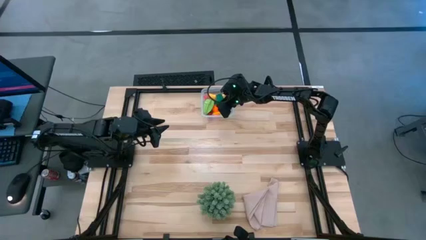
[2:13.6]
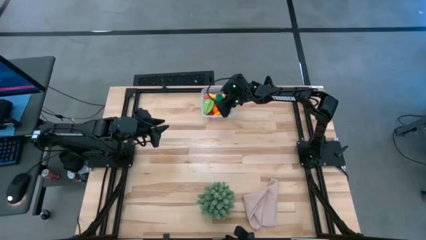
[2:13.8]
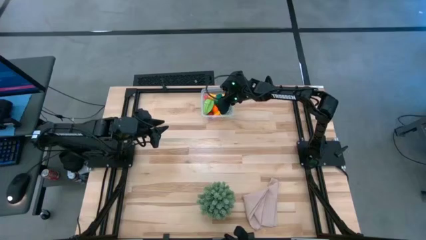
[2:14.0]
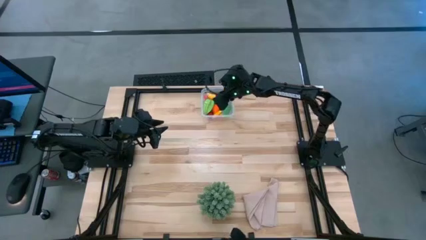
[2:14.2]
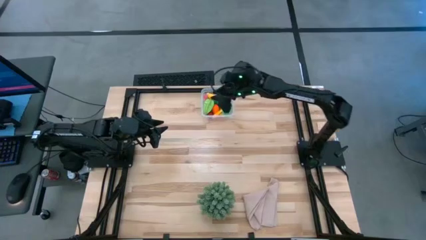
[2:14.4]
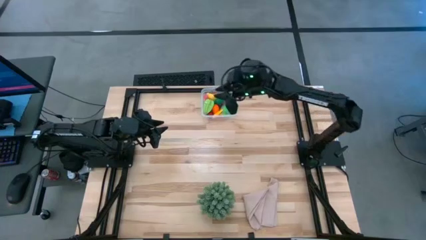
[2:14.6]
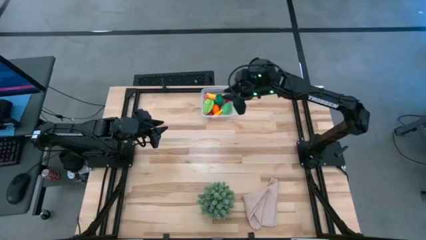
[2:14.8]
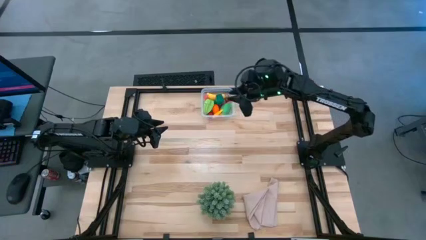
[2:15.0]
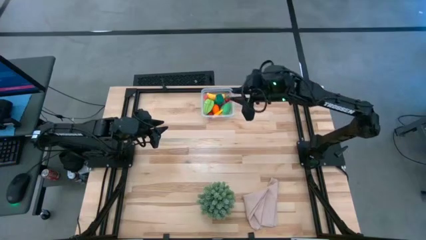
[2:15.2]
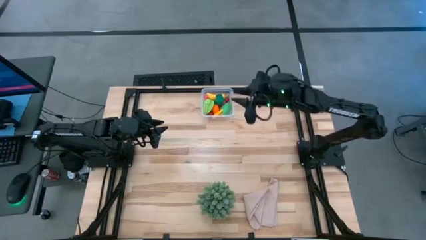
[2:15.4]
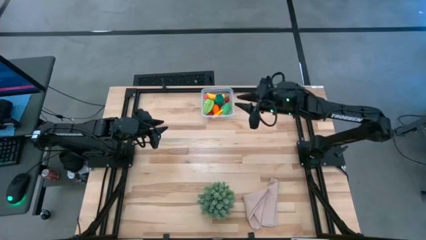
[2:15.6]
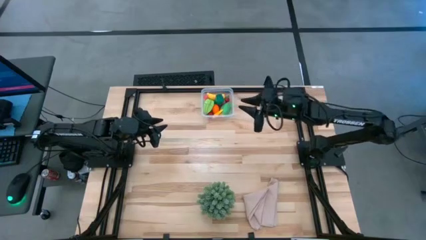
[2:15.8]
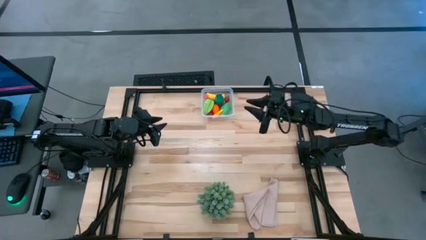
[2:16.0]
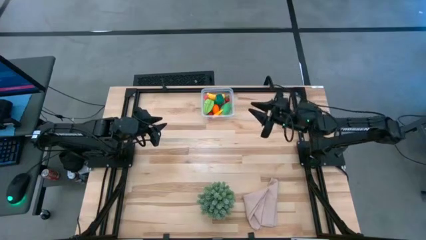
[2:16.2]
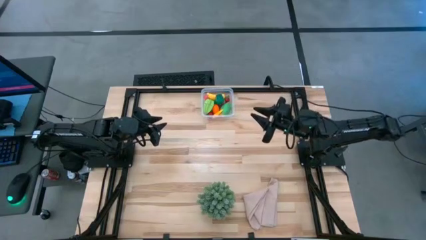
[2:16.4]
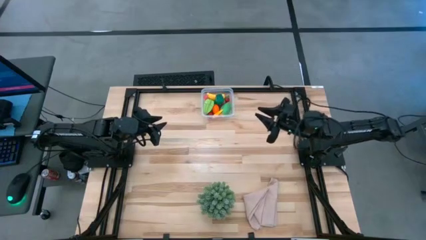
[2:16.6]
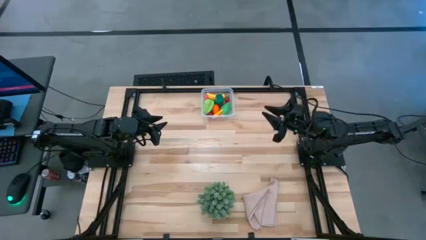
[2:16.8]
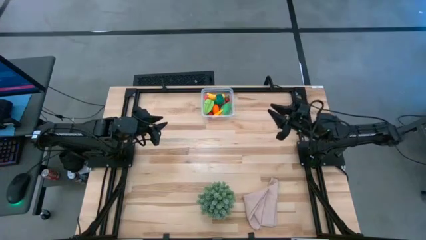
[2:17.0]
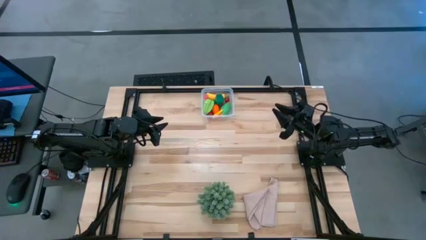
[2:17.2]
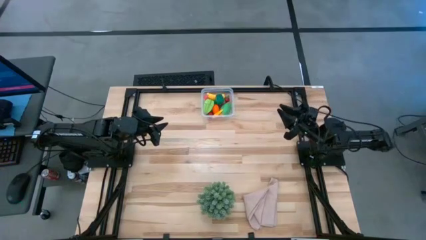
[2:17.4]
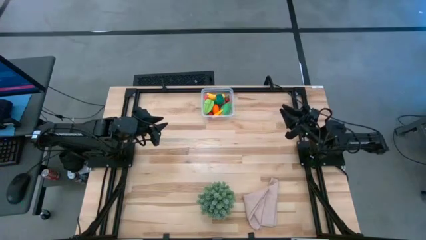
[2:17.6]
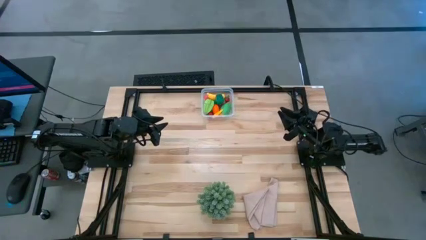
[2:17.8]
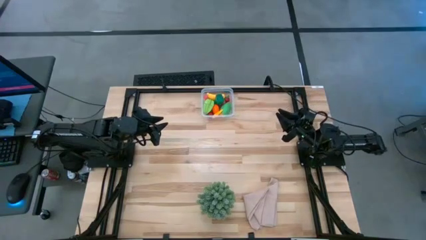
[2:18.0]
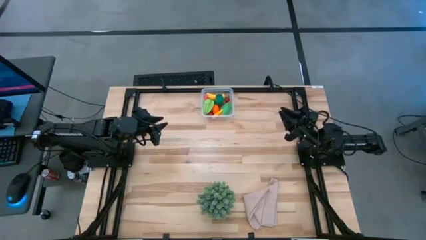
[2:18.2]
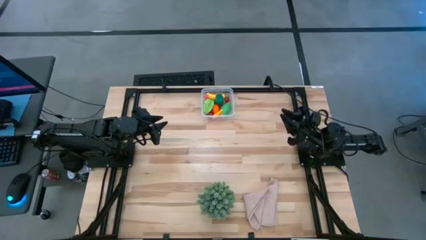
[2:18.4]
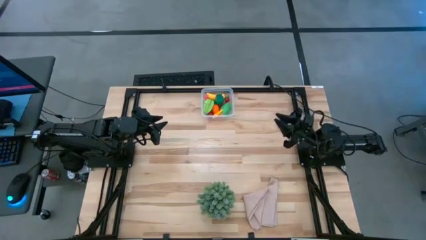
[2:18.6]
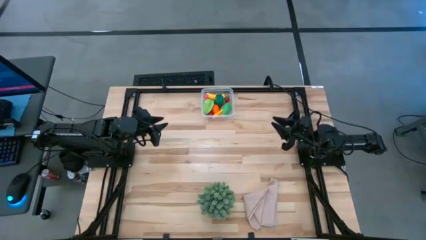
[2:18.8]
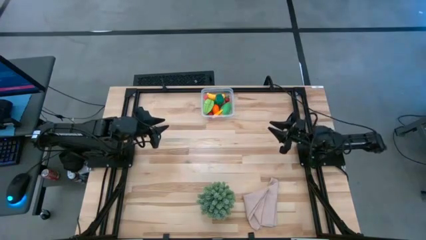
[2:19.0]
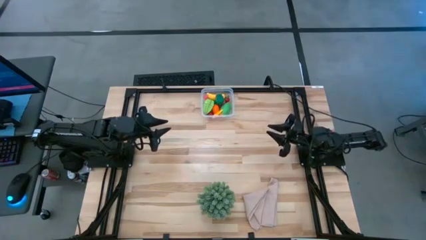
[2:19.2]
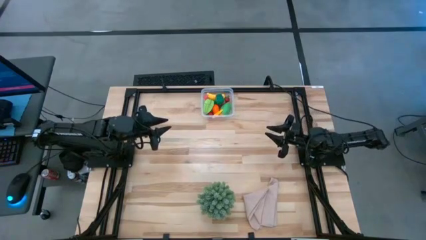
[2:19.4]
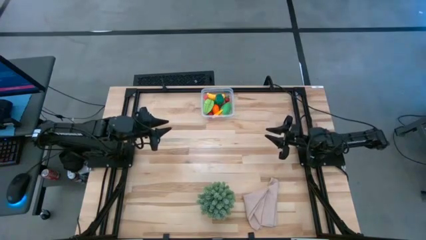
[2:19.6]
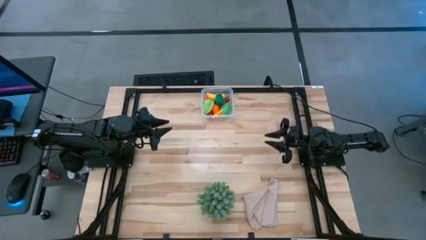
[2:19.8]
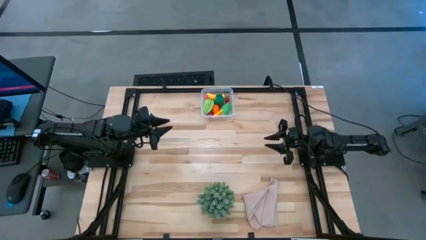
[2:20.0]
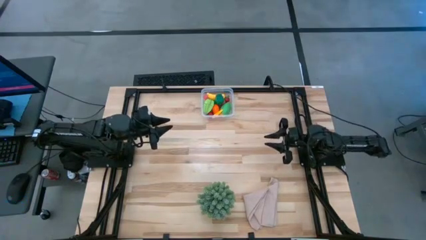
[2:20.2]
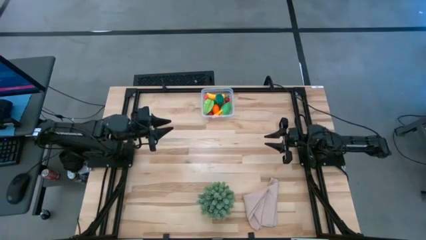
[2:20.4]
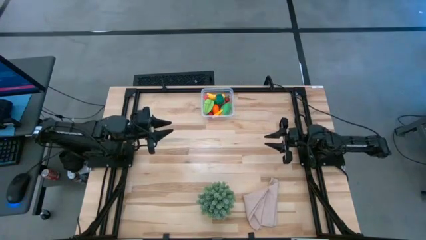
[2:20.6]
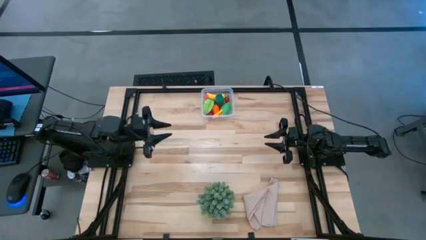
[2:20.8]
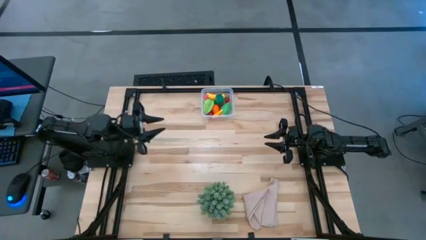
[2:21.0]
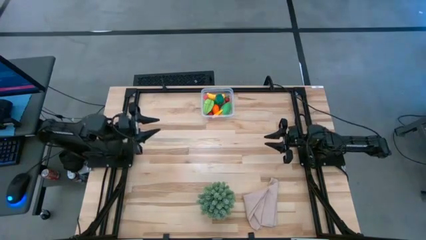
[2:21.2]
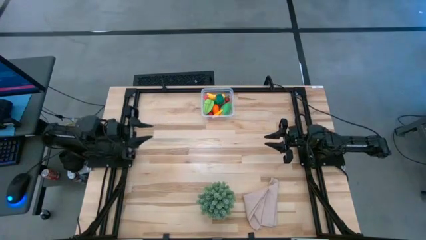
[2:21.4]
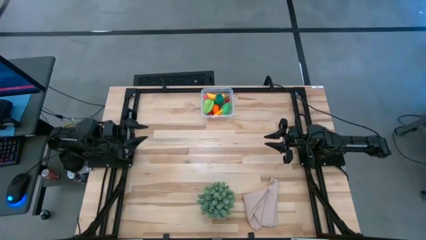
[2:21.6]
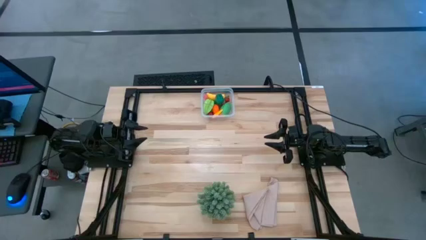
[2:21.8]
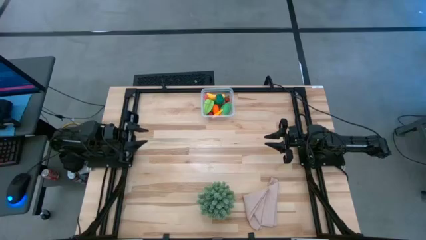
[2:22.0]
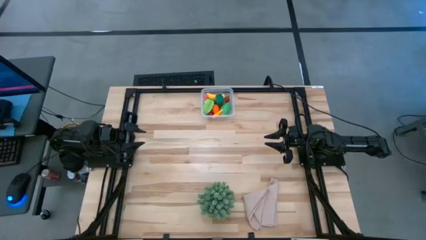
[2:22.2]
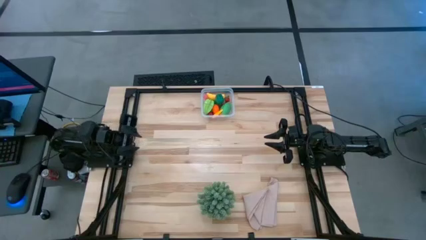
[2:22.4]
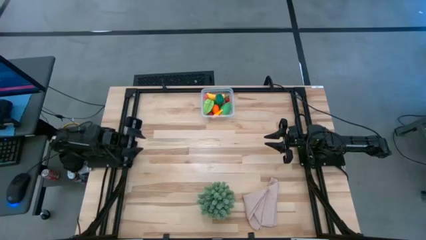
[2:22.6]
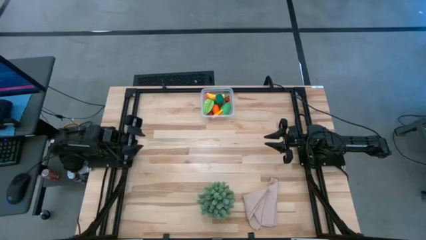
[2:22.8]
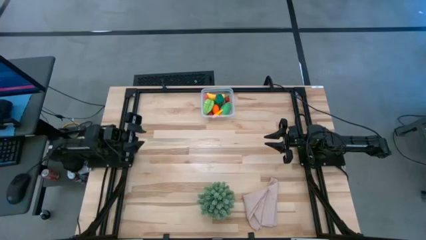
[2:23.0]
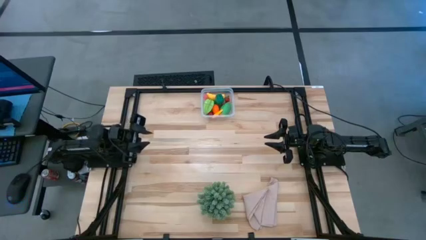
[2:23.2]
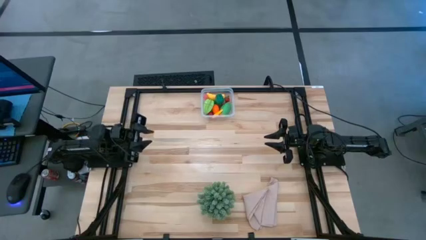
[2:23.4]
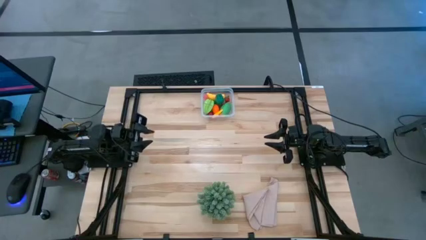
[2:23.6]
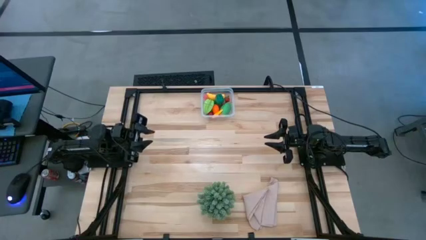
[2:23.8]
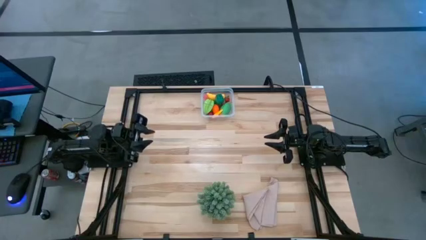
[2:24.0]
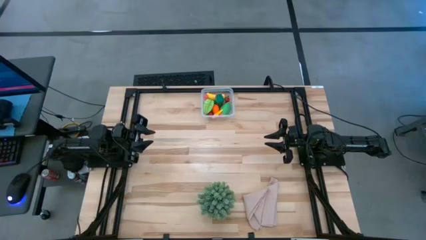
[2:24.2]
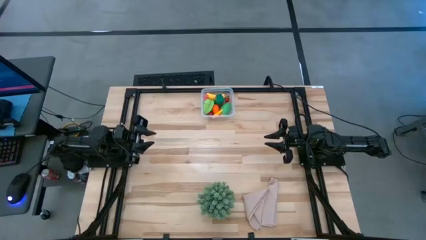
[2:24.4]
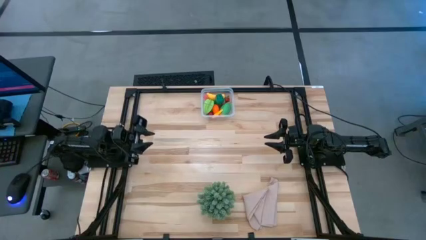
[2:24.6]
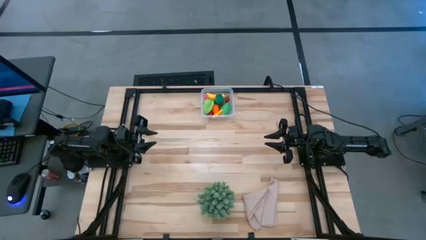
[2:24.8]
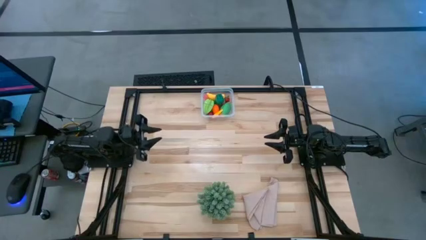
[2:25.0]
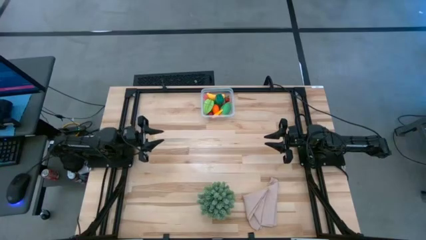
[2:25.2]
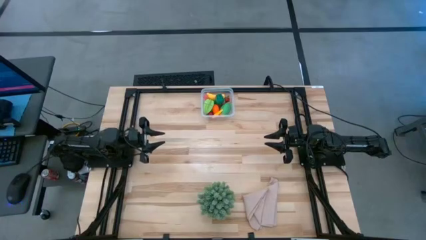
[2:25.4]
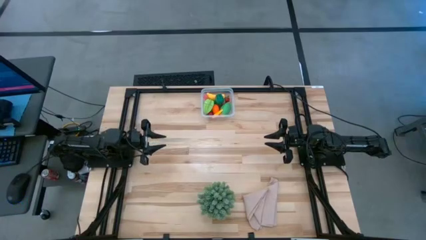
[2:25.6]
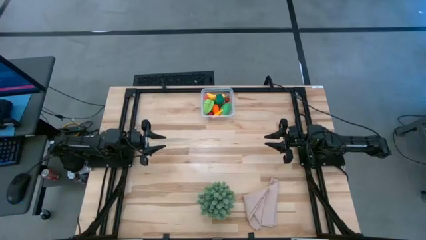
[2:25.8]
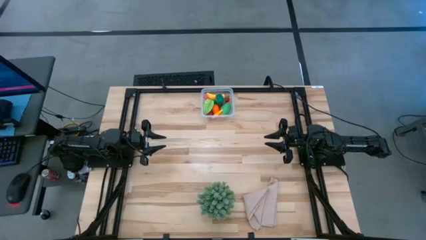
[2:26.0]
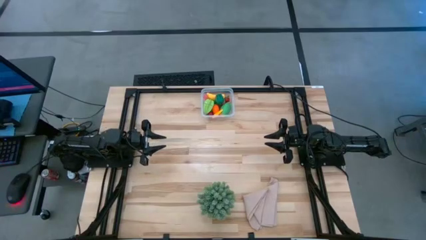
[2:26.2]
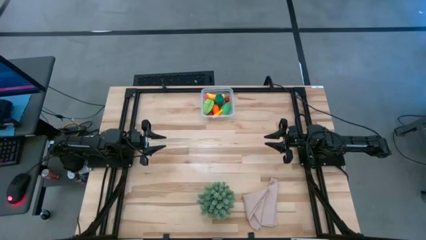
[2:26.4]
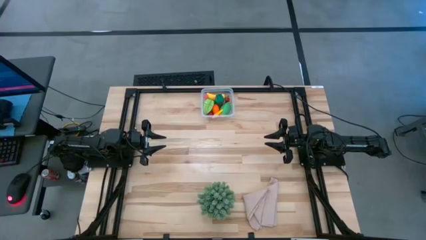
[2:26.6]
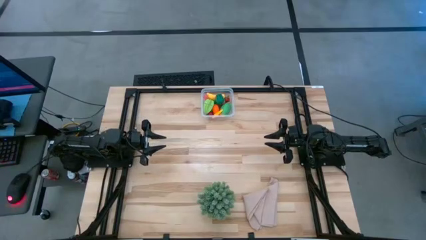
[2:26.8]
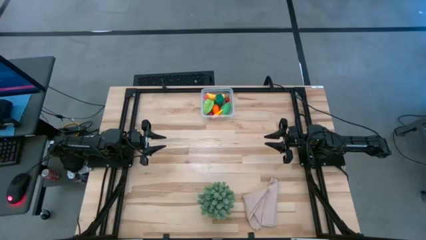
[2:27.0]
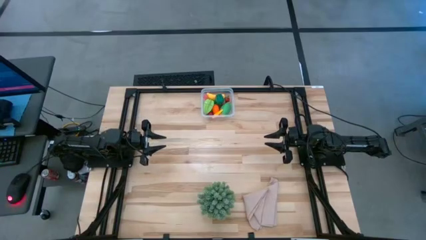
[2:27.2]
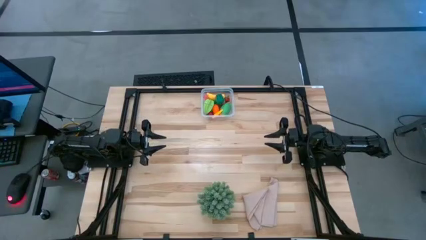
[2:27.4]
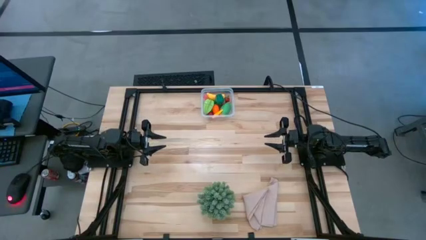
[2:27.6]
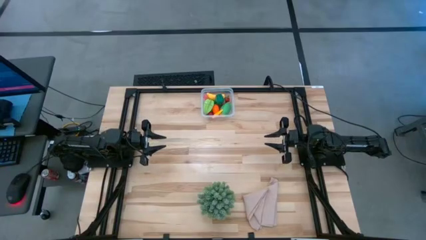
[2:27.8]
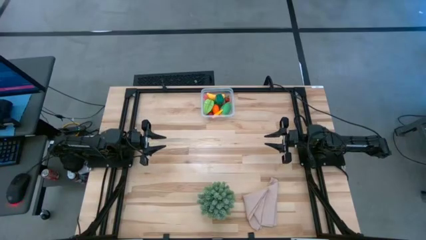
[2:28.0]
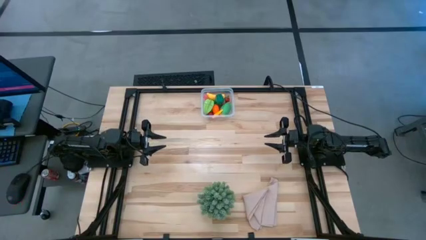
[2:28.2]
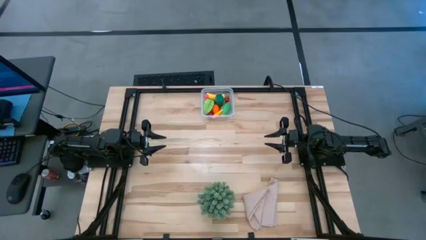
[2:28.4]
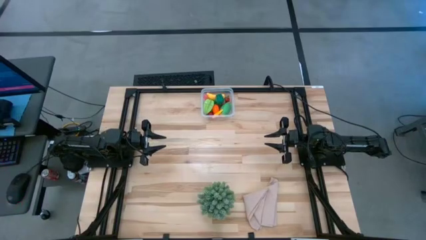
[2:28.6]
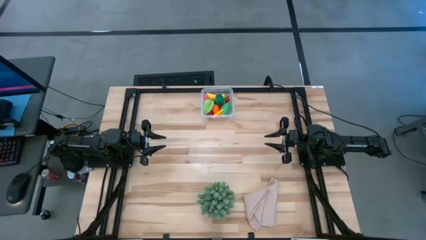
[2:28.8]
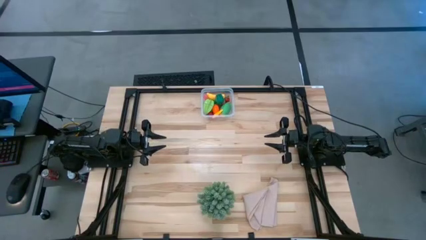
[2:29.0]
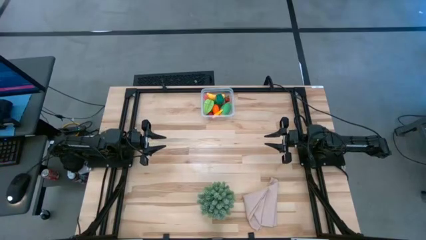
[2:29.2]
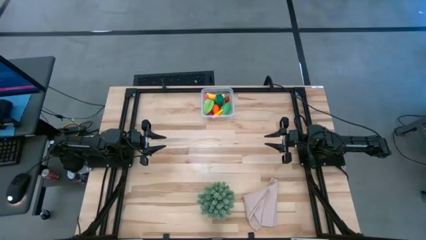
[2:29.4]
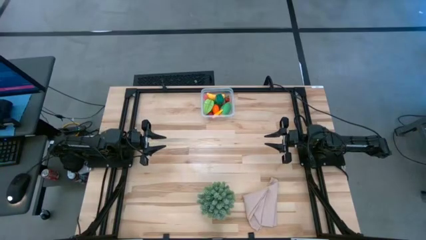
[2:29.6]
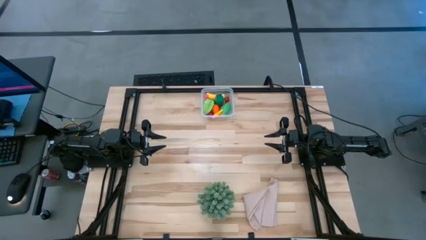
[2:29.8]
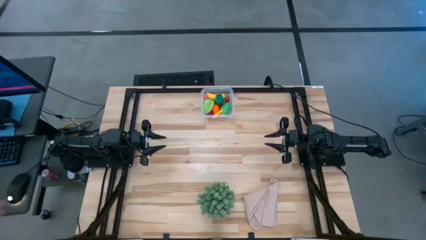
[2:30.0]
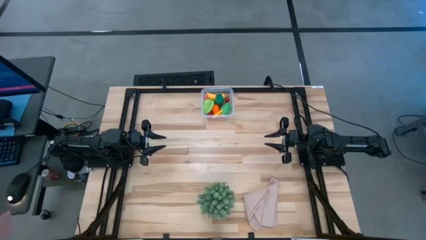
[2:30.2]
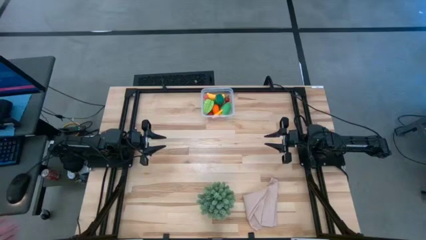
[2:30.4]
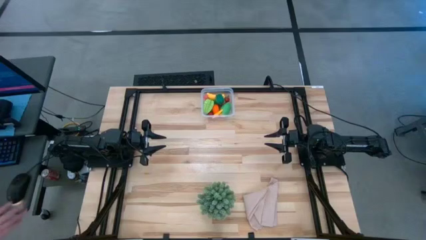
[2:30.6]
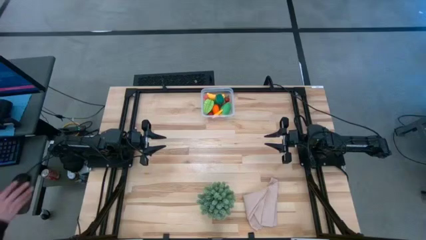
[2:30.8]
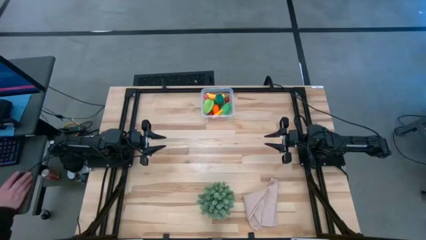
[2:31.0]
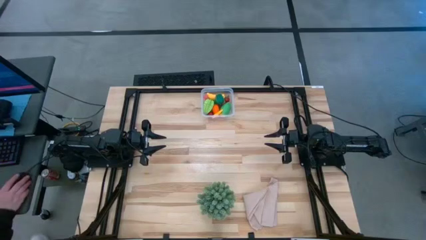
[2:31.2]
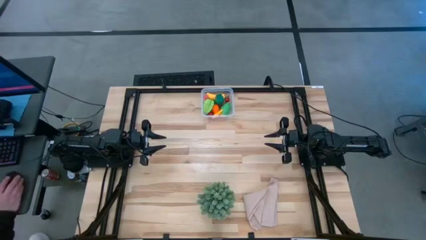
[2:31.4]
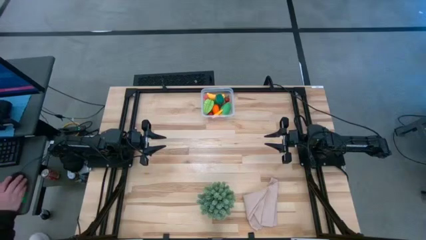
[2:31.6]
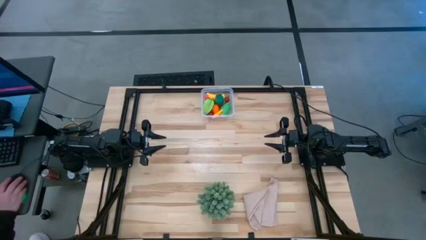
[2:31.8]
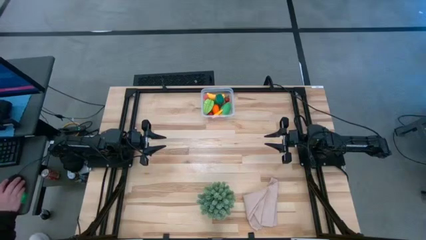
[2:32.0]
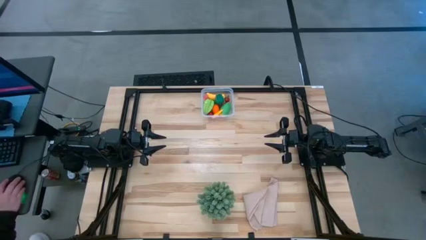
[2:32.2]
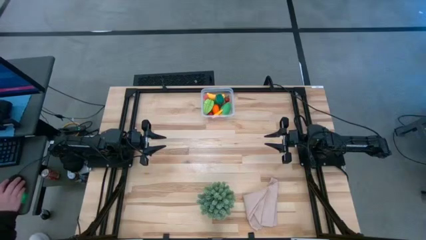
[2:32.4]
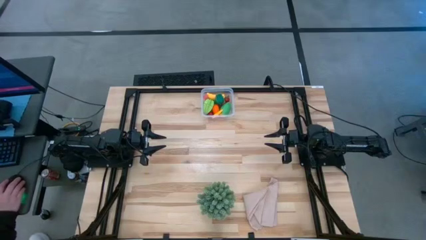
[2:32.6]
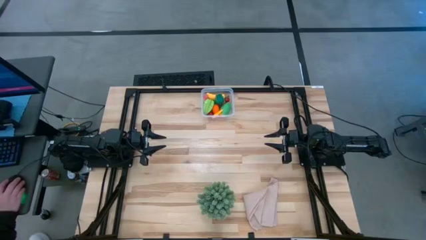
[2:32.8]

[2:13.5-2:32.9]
Task: Pick and placing Produce into tupperware
Return to Home Position
